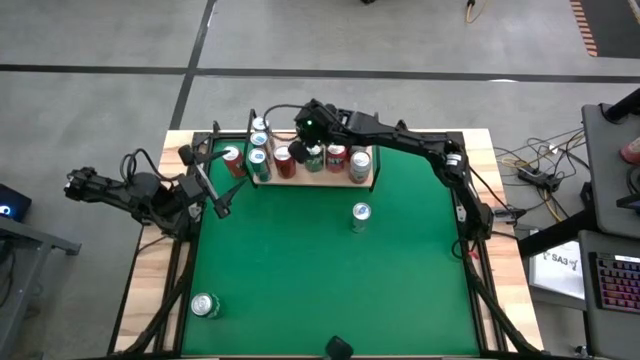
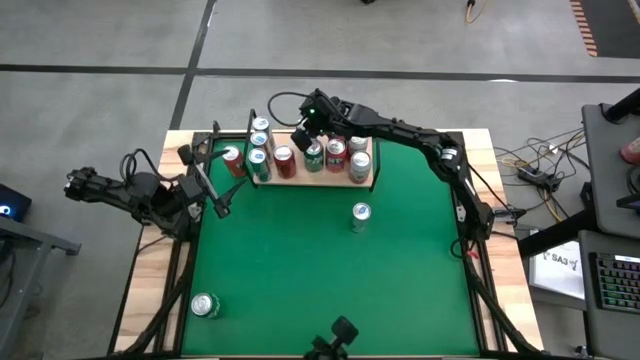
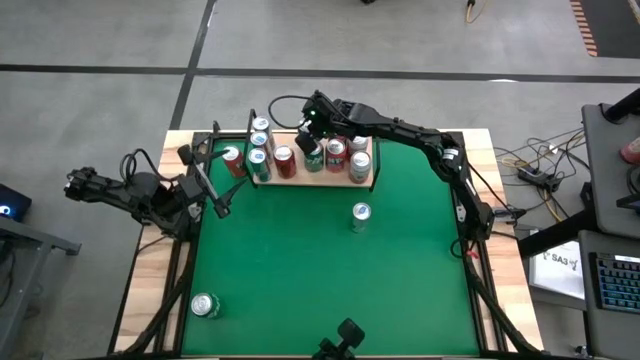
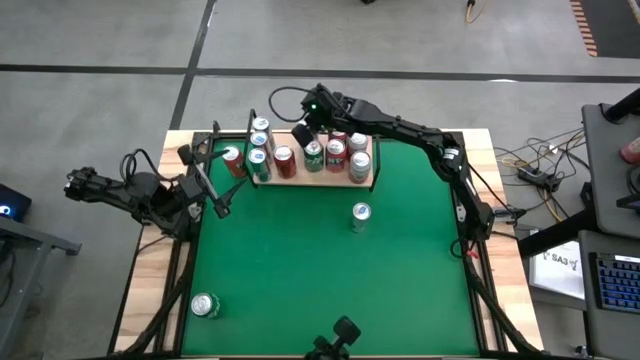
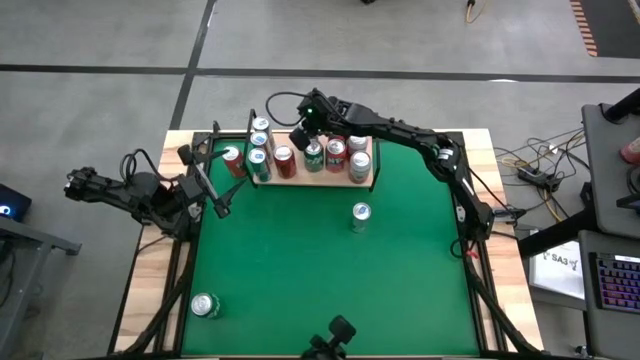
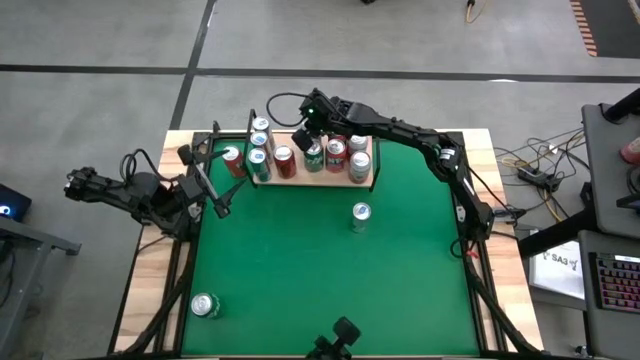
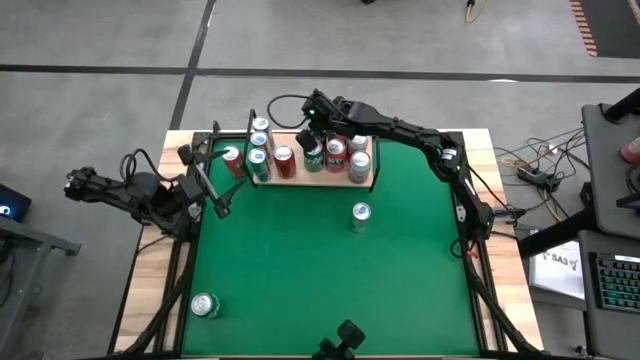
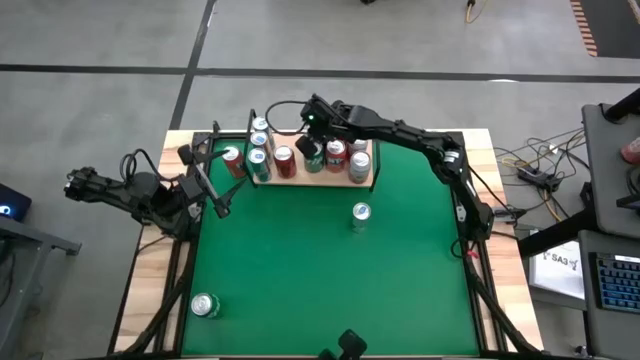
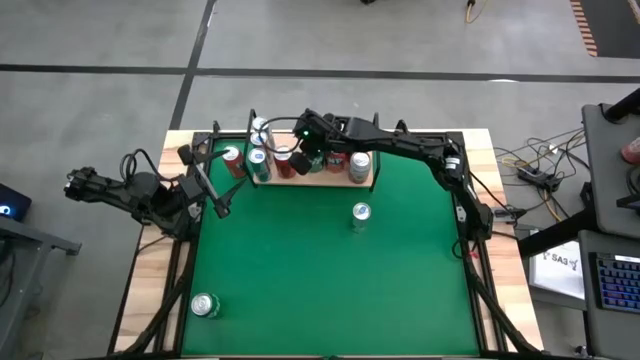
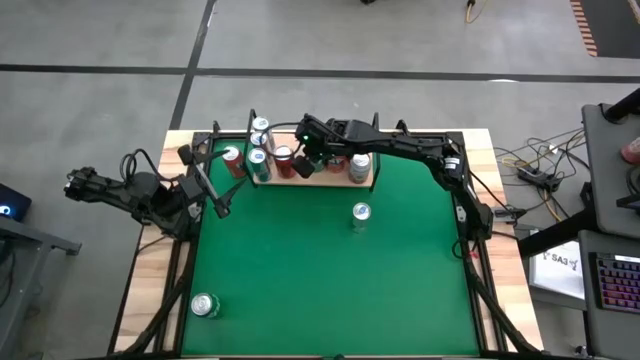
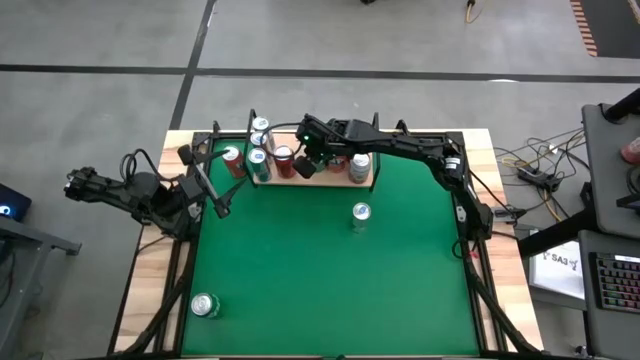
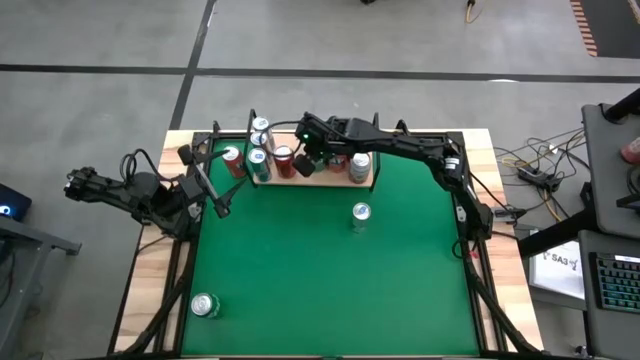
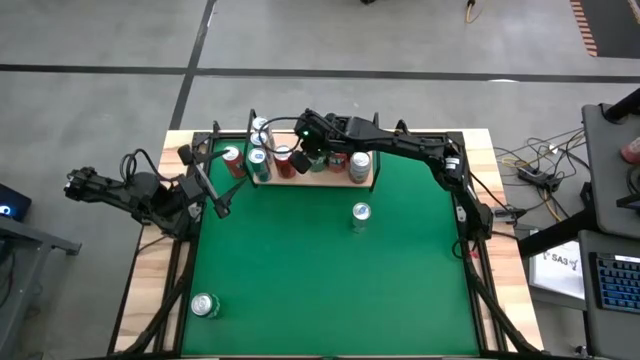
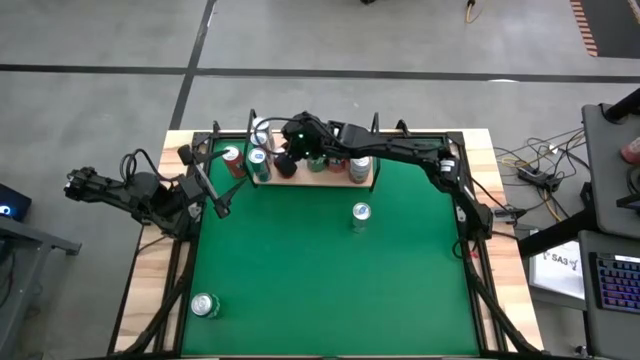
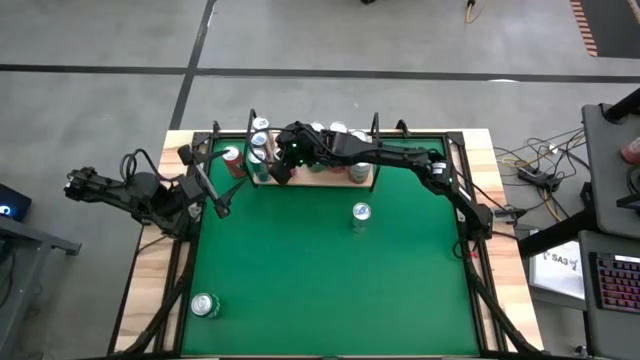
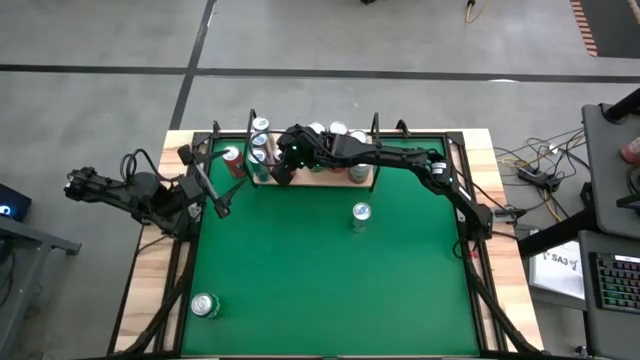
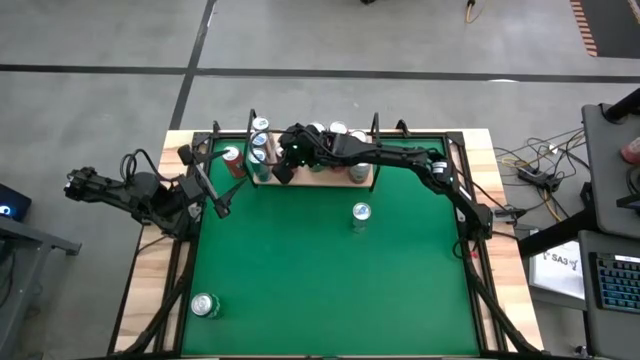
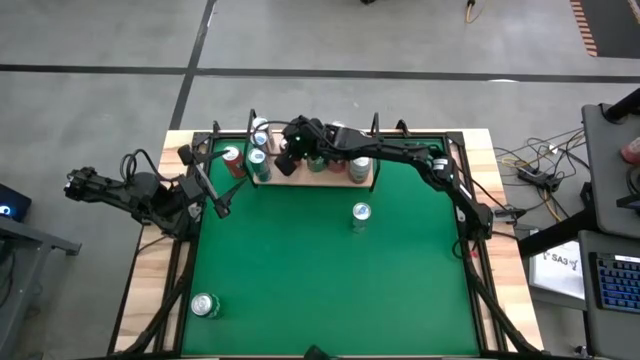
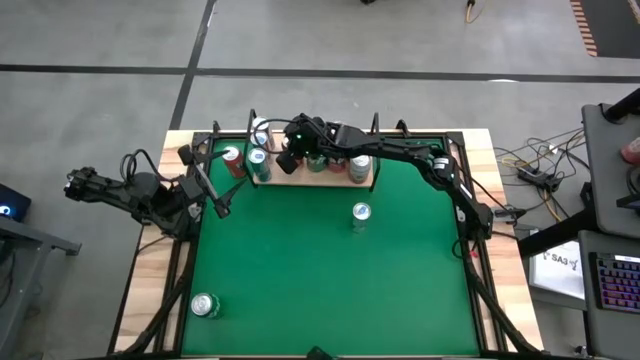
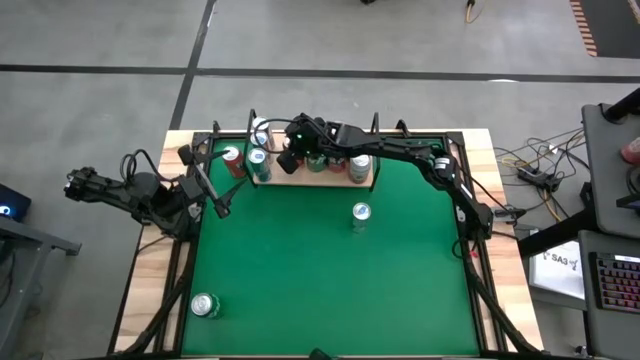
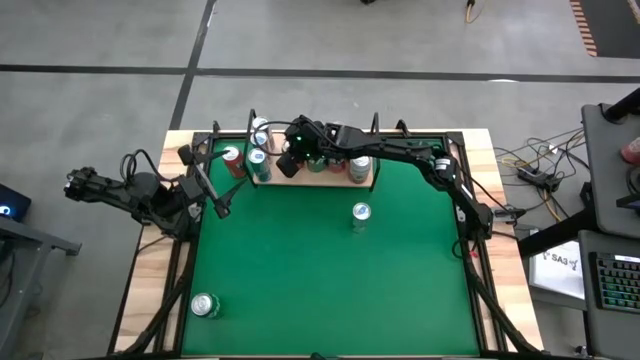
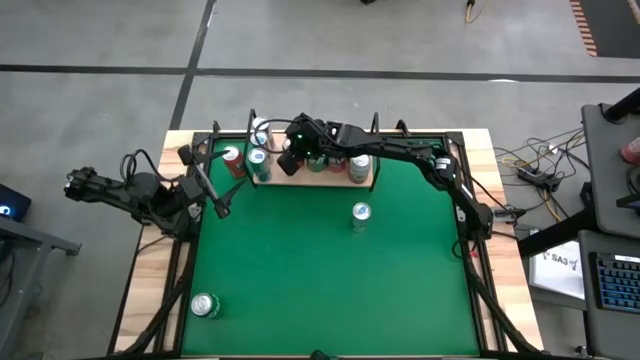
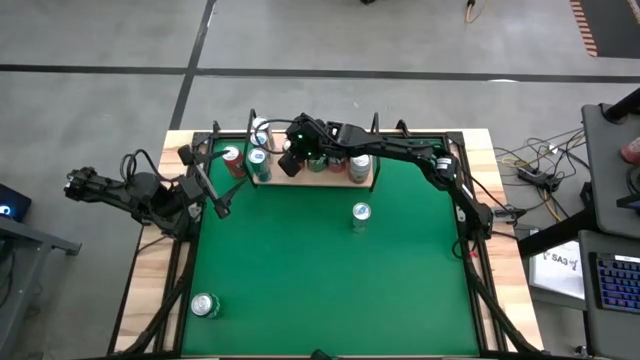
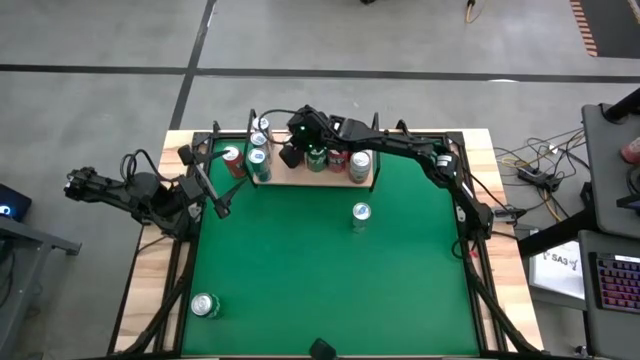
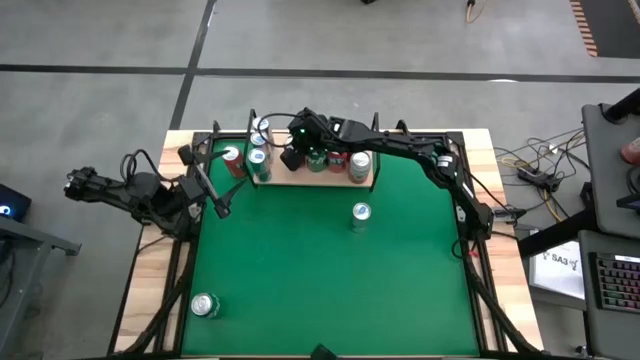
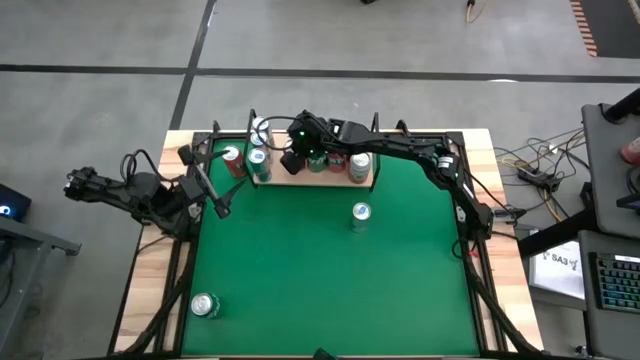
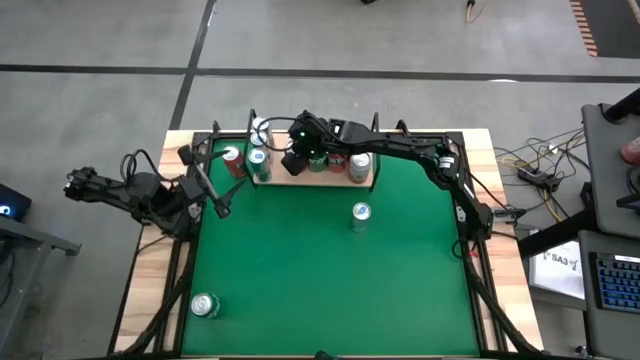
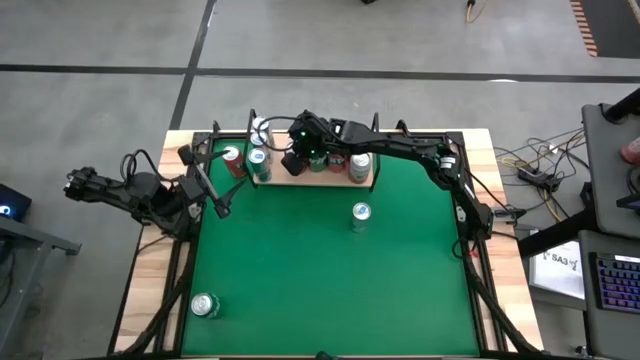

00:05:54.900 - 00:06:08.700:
Task: Pick and place cans onto a shelf
Adjust the soda cans on the shelf

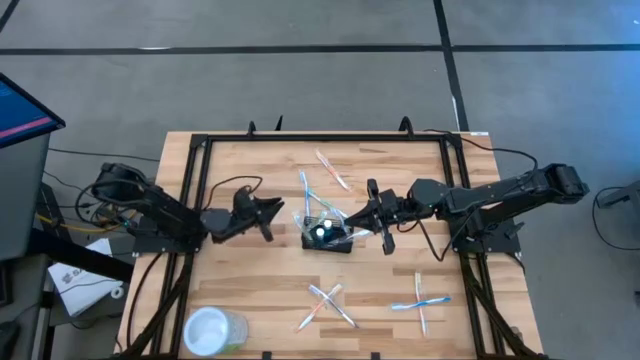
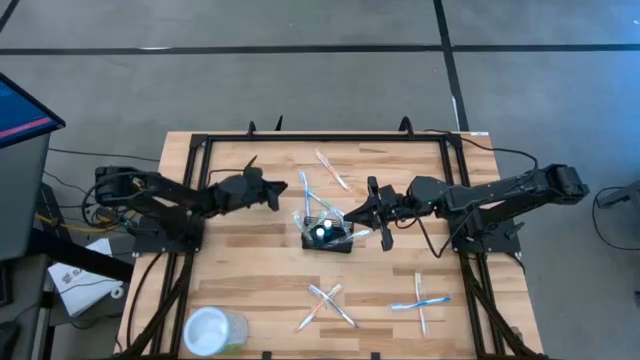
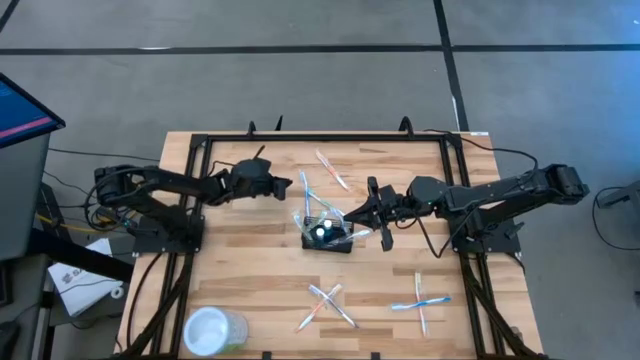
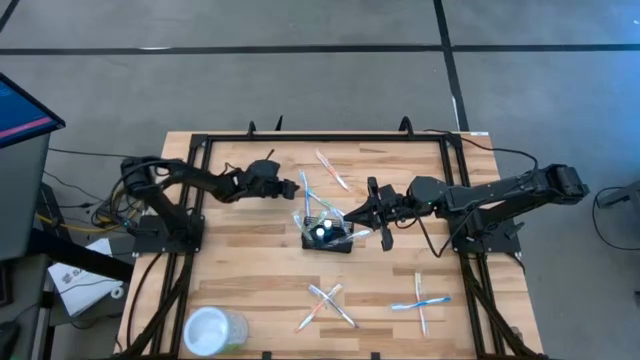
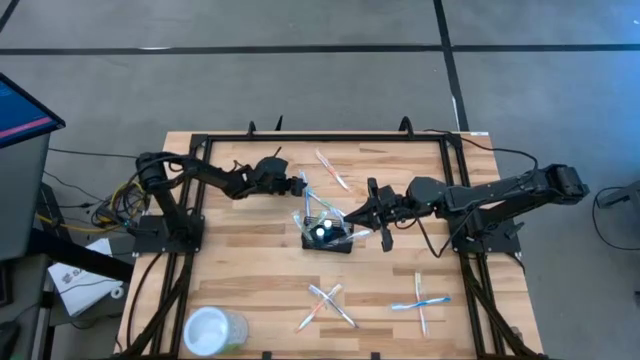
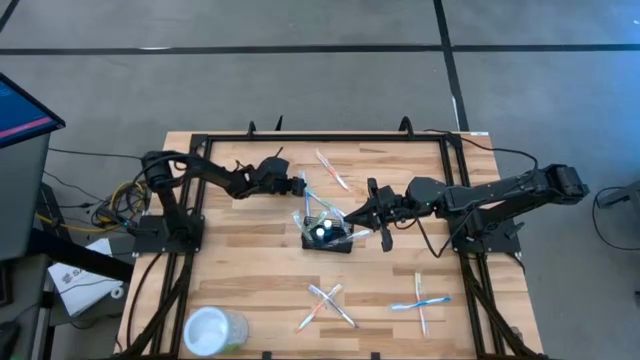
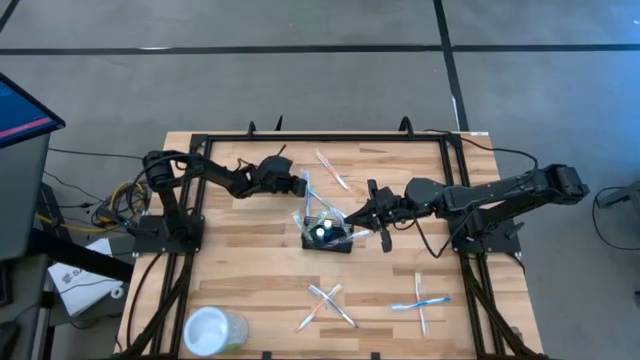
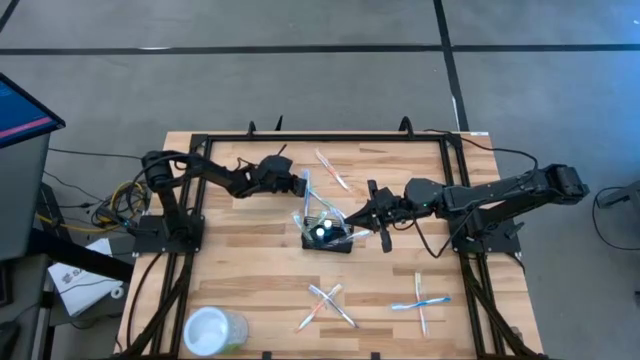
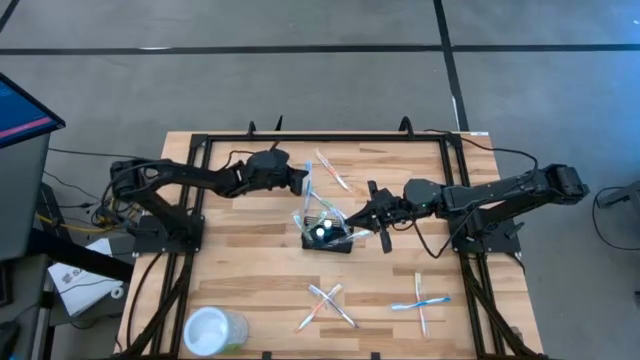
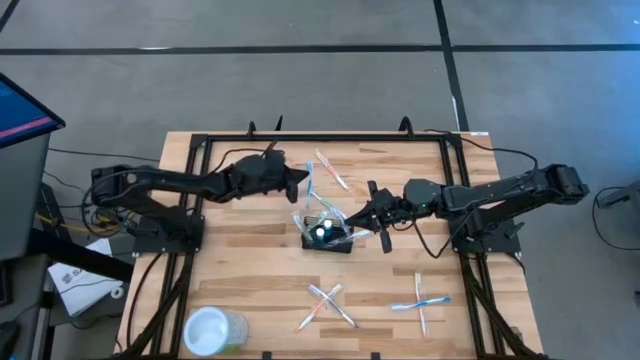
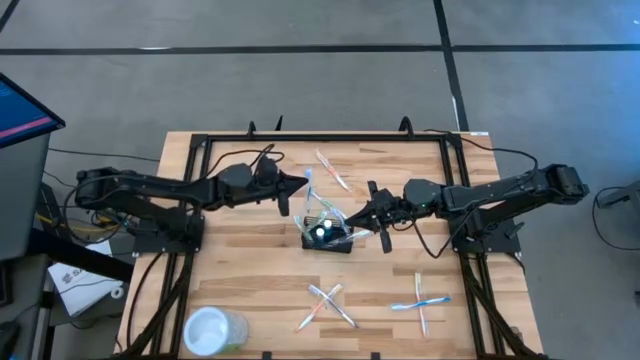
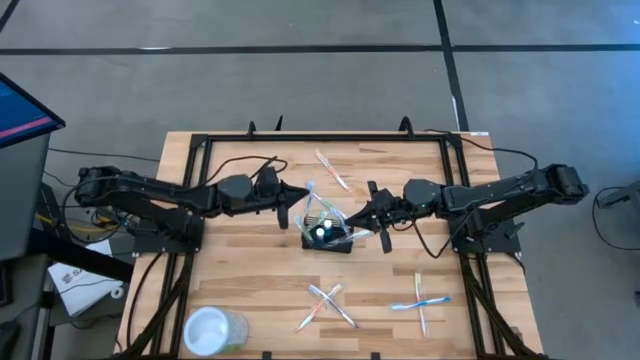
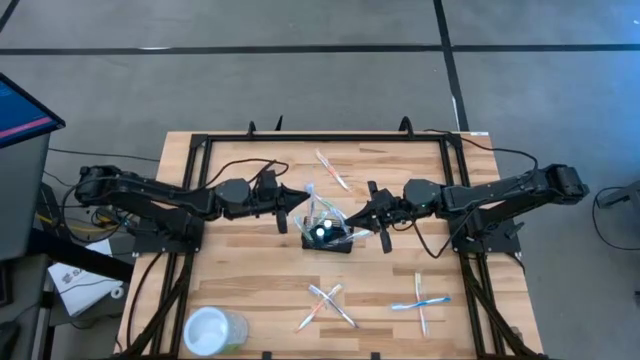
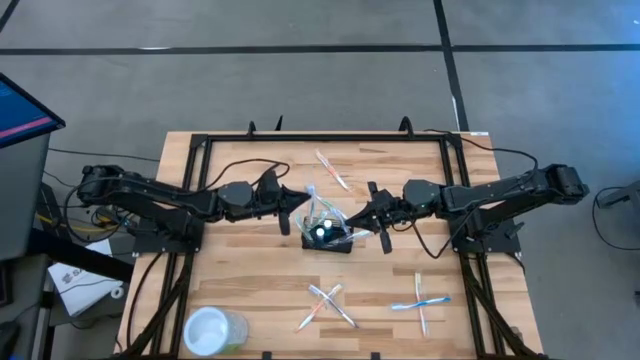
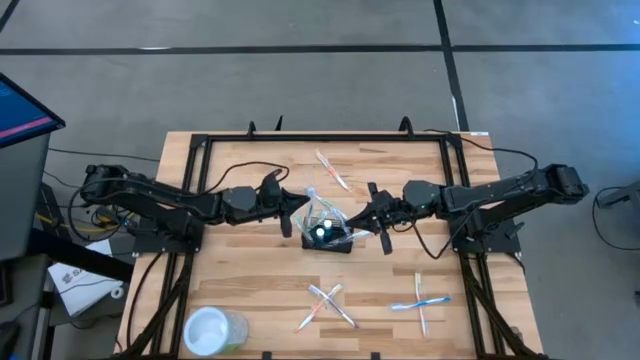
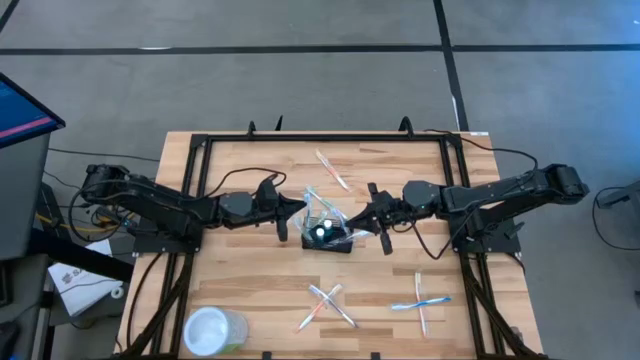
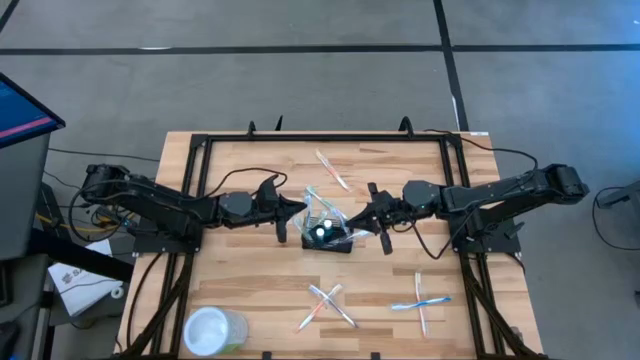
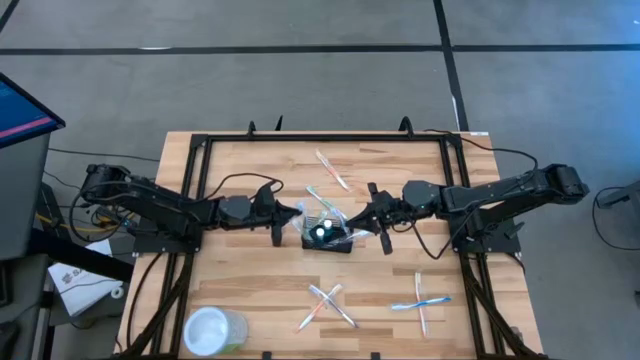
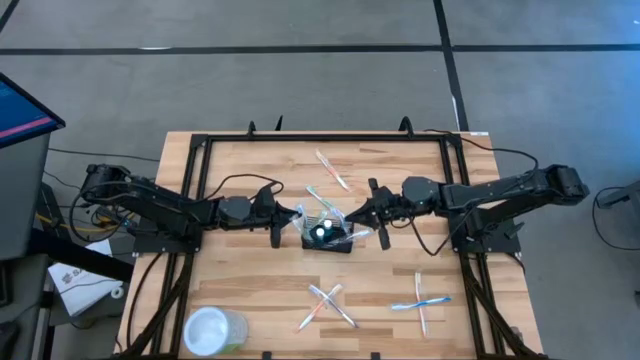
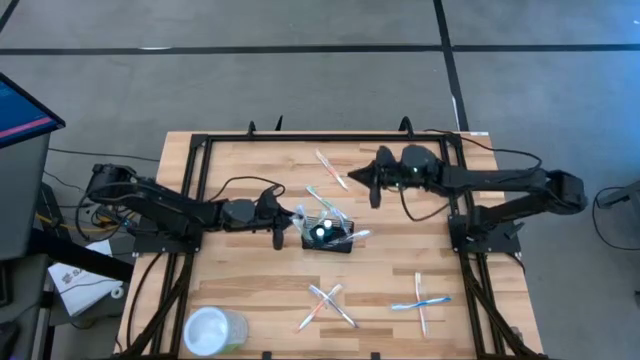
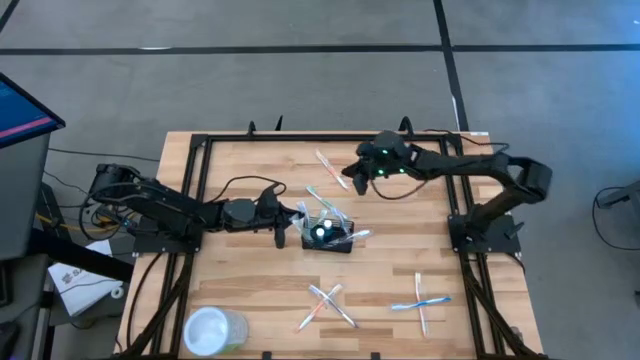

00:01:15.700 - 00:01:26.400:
Task: Pick & Place toothbrushing station
Put the top blue toothbrush into the wire organizer
